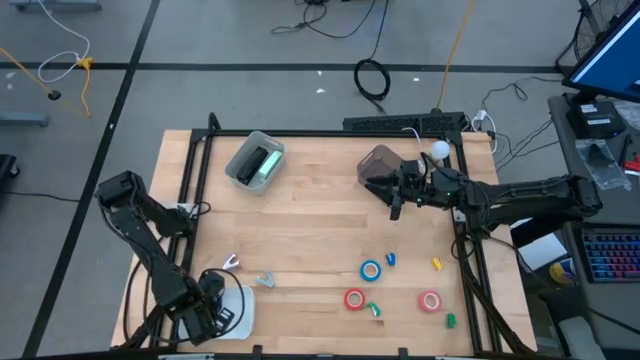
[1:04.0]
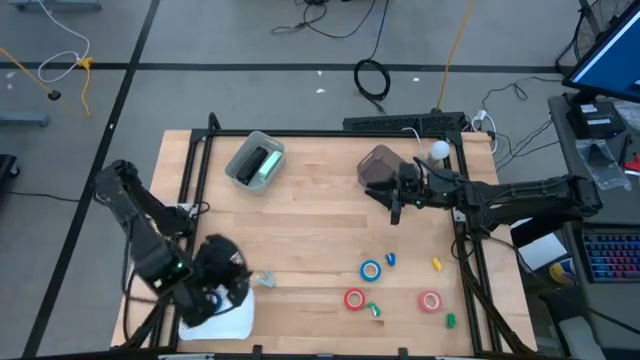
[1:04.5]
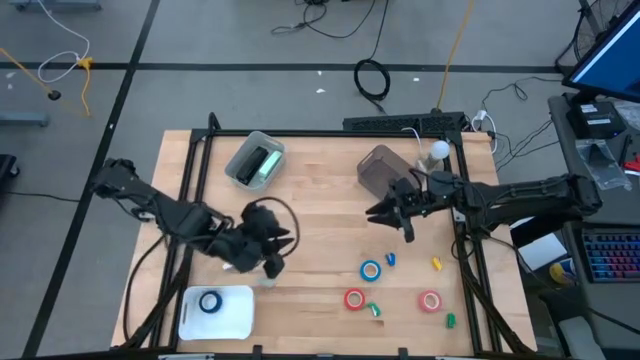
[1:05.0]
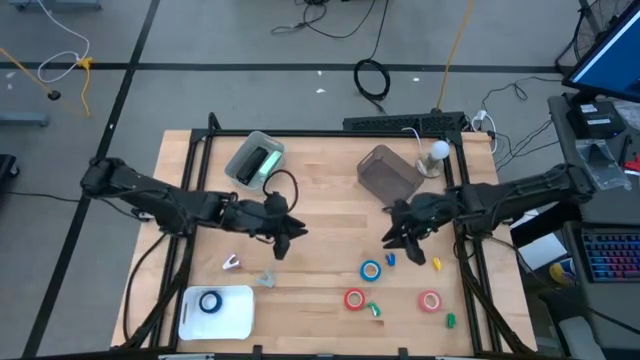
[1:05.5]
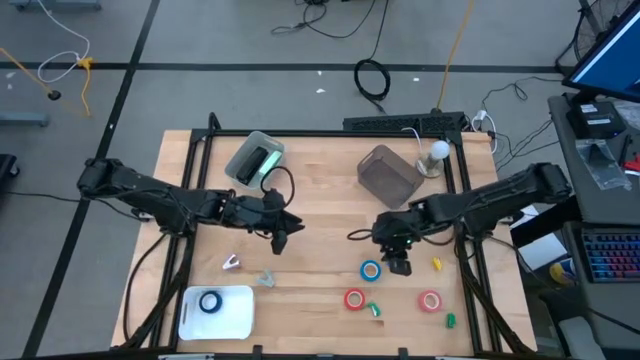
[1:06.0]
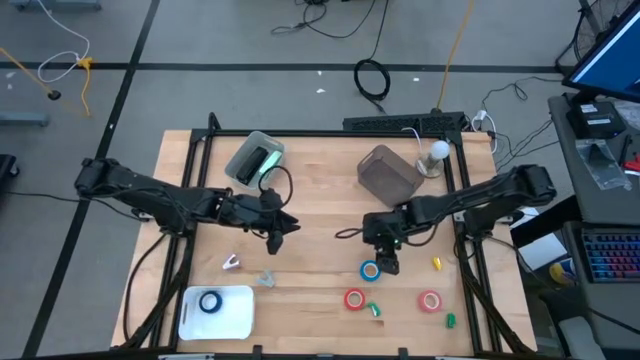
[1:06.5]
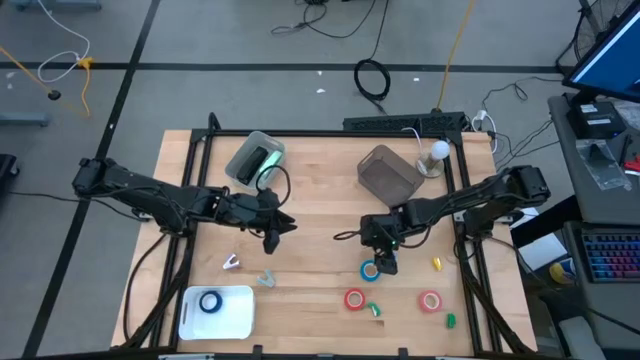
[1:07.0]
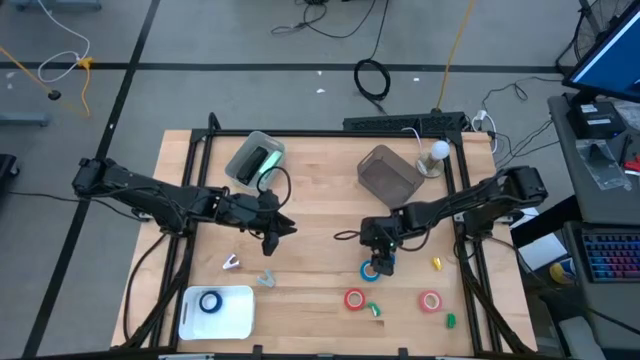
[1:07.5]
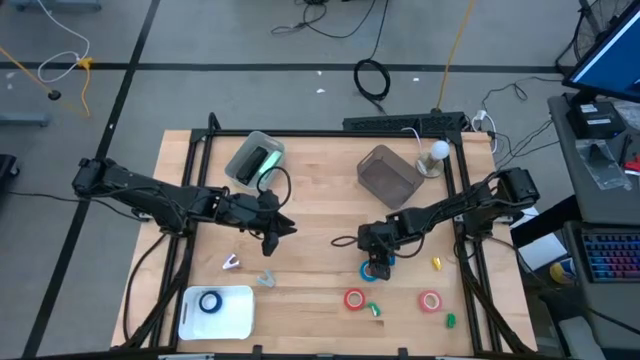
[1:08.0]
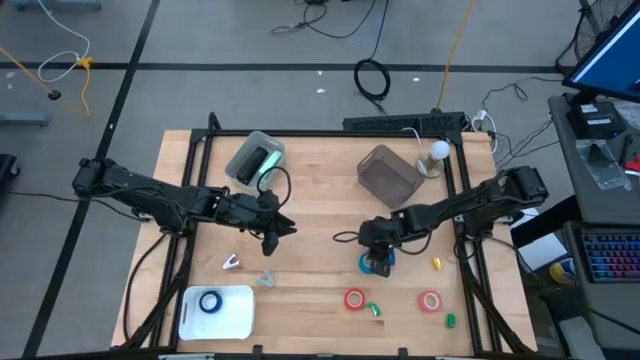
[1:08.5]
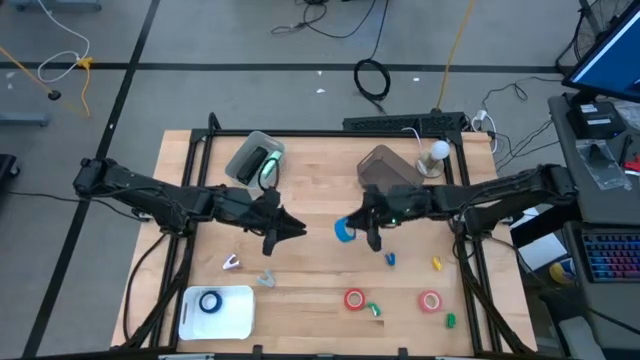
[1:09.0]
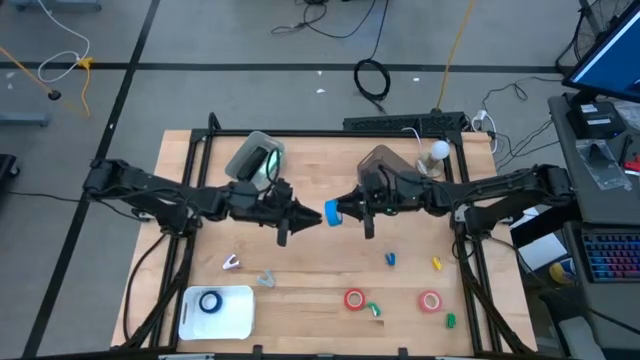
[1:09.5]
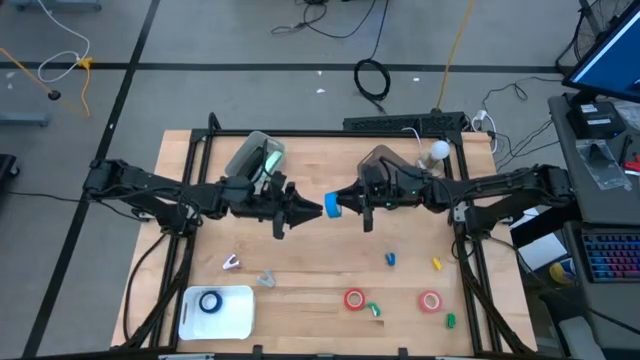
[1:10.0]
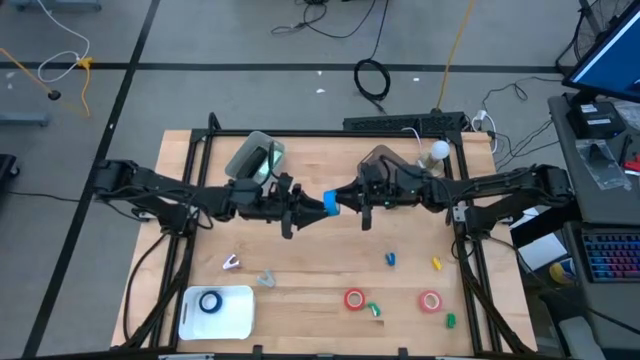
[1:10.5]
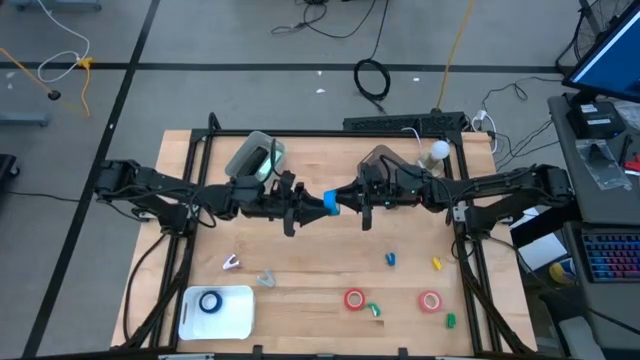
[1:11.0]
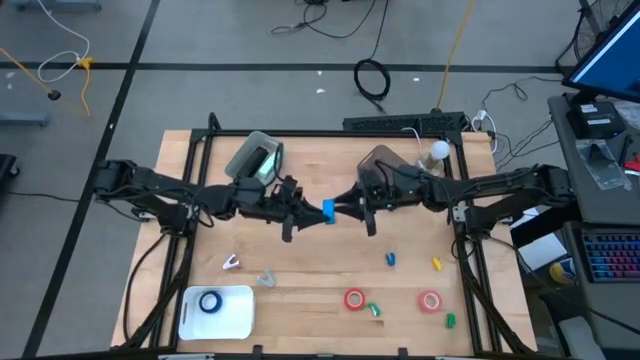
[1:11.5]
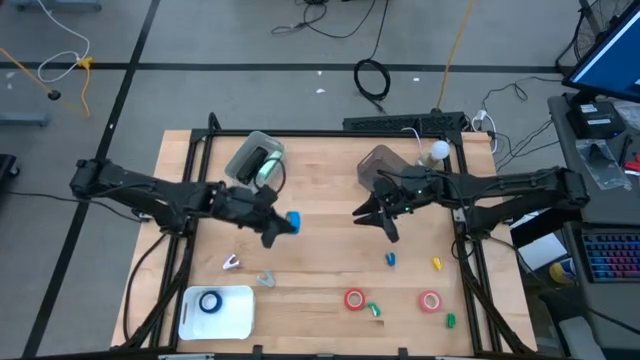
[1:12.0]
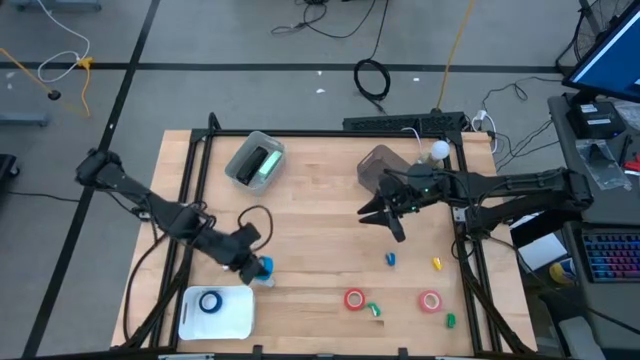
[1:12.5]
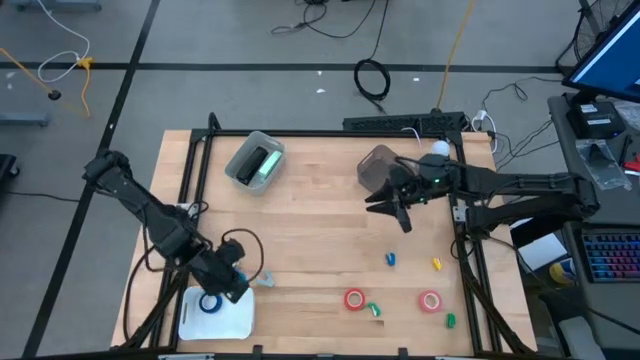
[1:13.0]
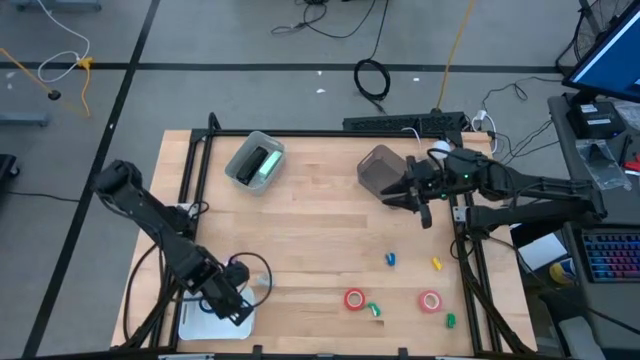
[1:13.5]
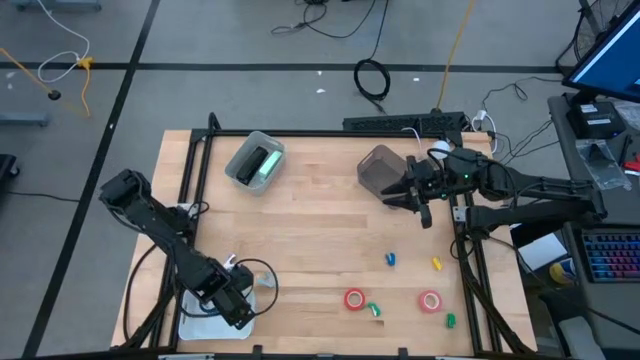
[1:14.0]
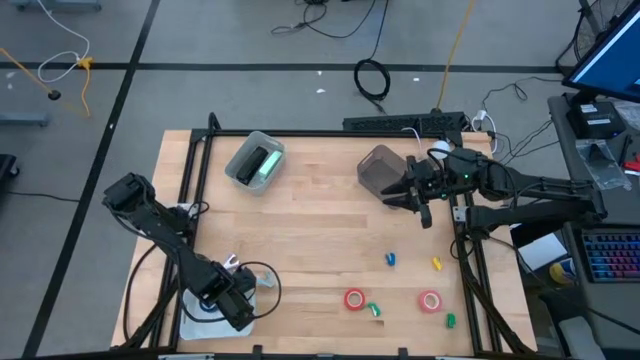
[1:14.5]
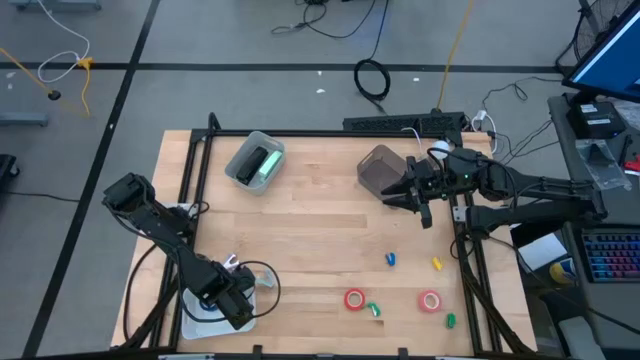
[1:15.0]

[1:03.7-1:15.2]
Task: Pick and place Stapler, Stapler remover, tape
Put the blue tape into the white bin

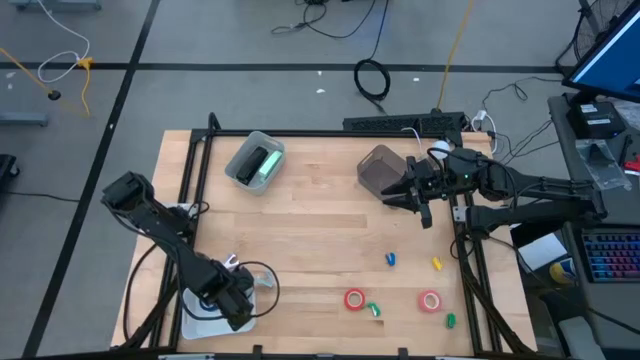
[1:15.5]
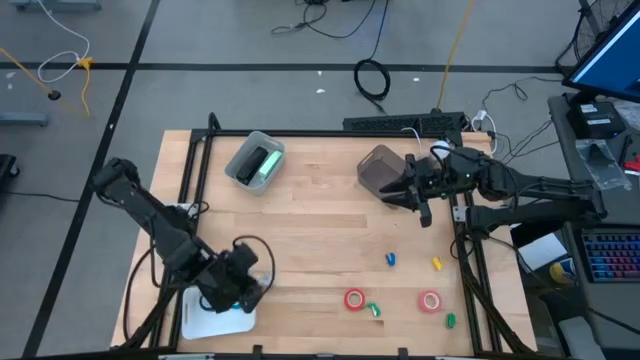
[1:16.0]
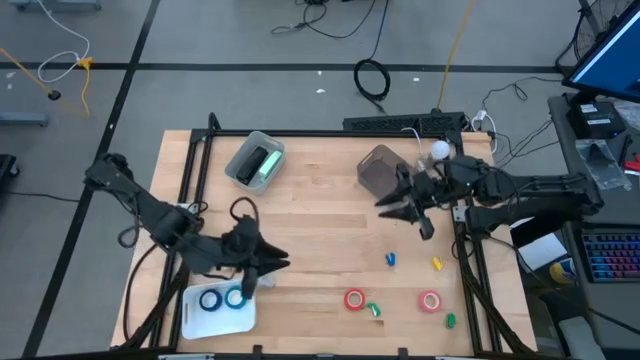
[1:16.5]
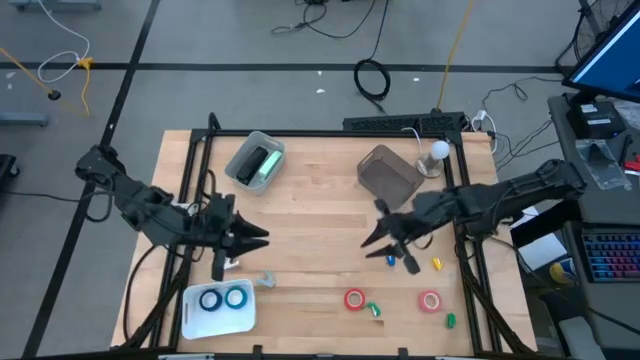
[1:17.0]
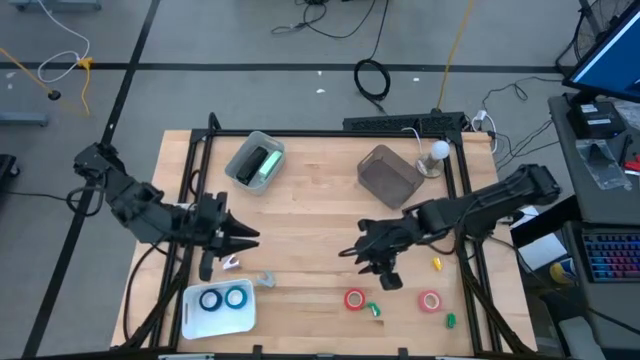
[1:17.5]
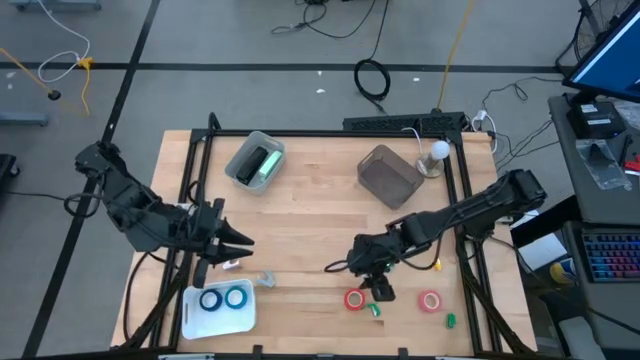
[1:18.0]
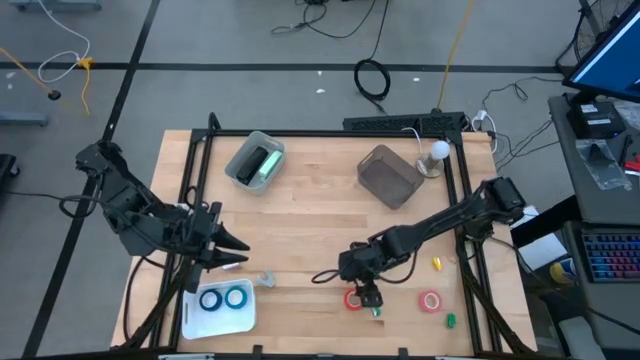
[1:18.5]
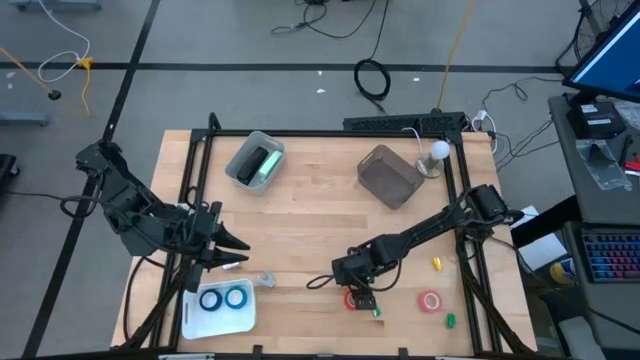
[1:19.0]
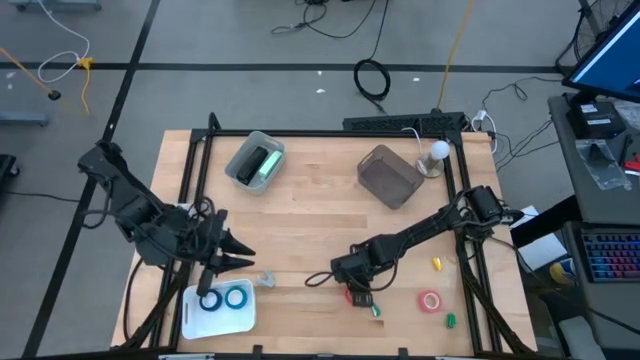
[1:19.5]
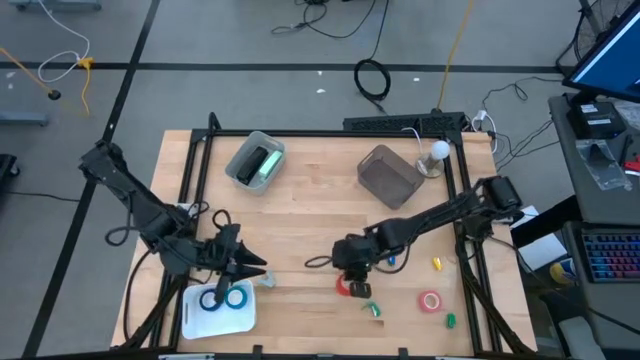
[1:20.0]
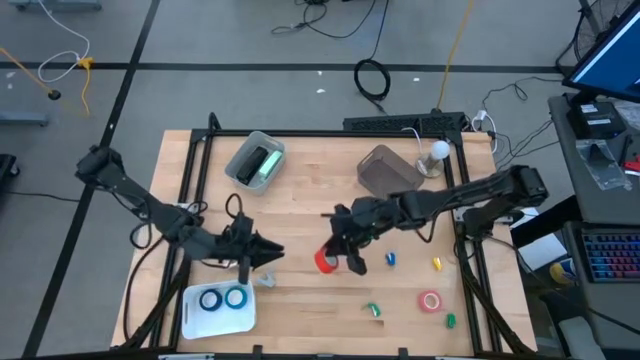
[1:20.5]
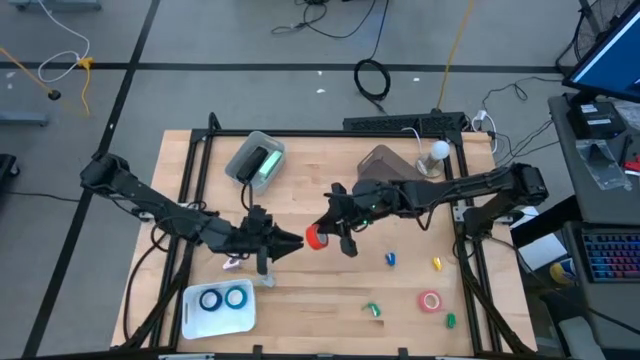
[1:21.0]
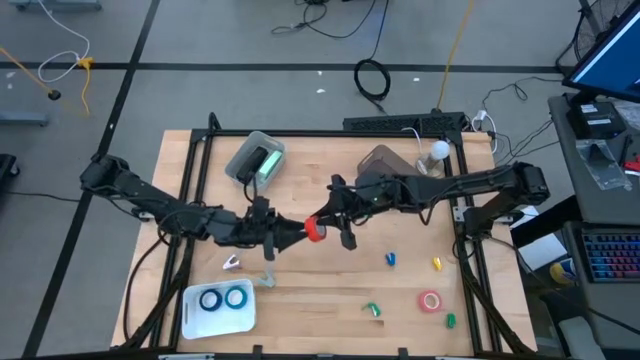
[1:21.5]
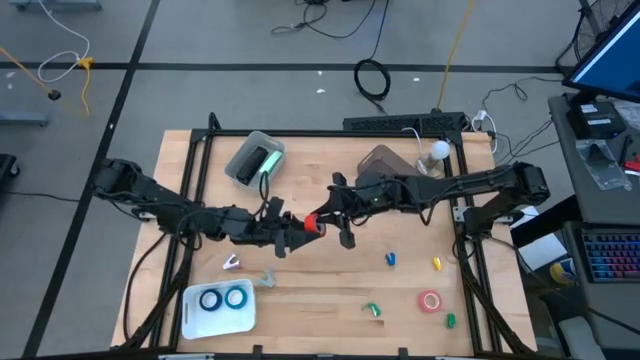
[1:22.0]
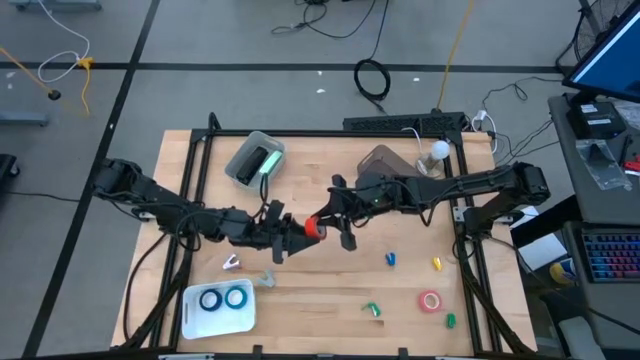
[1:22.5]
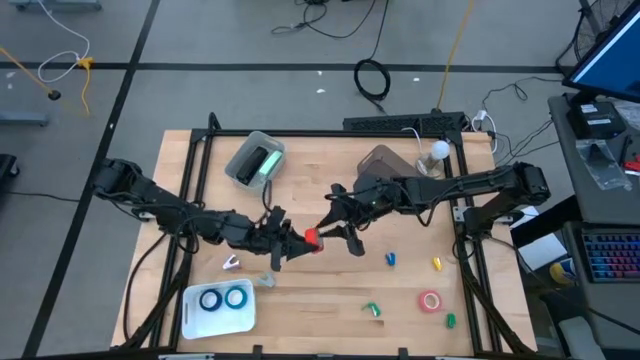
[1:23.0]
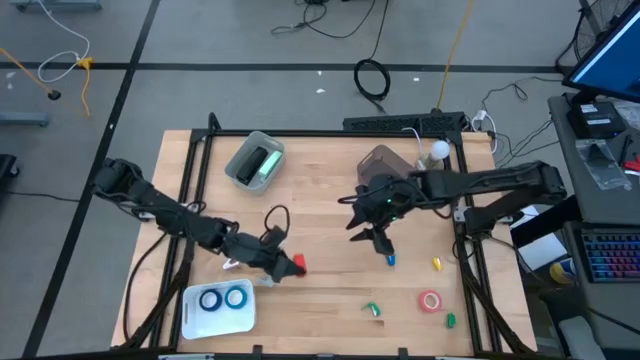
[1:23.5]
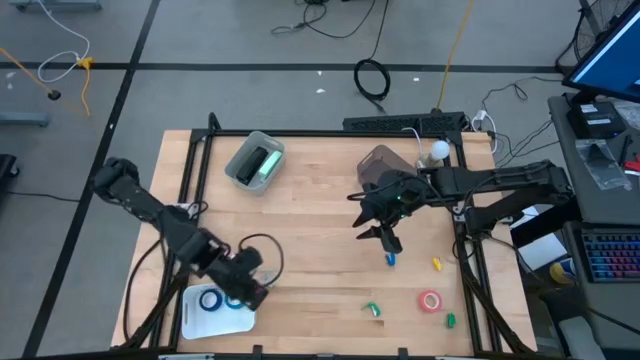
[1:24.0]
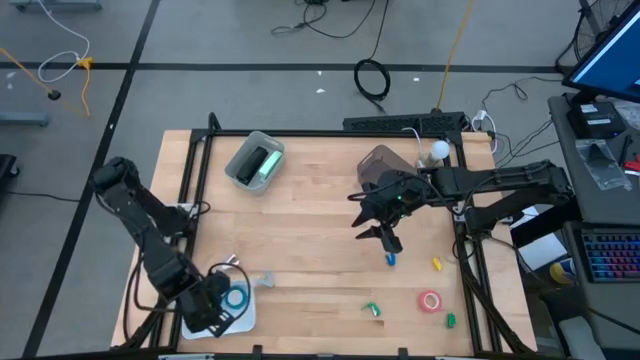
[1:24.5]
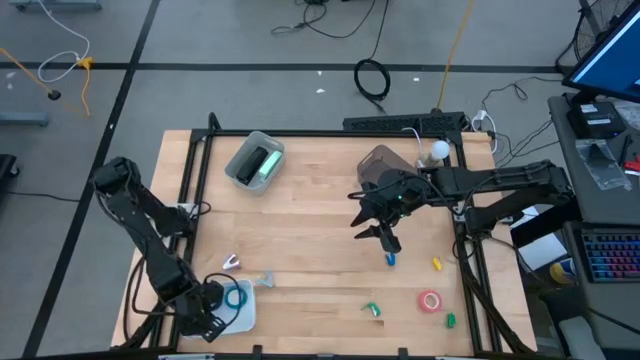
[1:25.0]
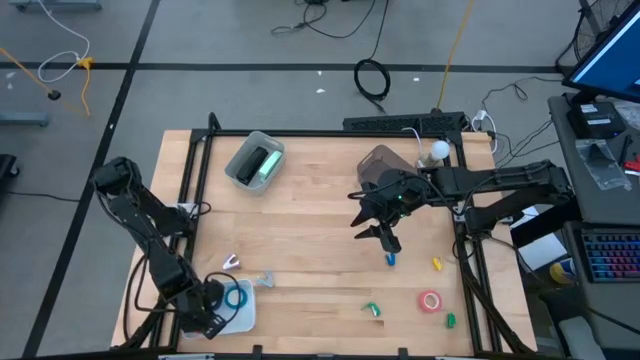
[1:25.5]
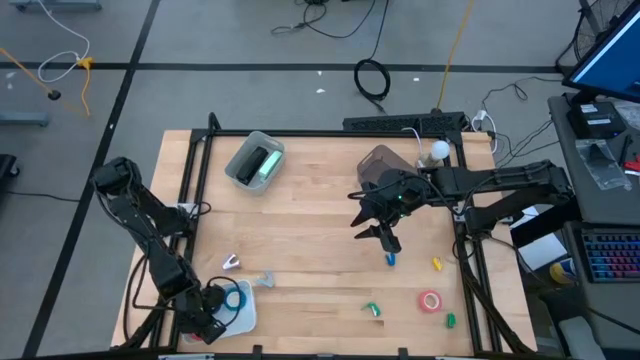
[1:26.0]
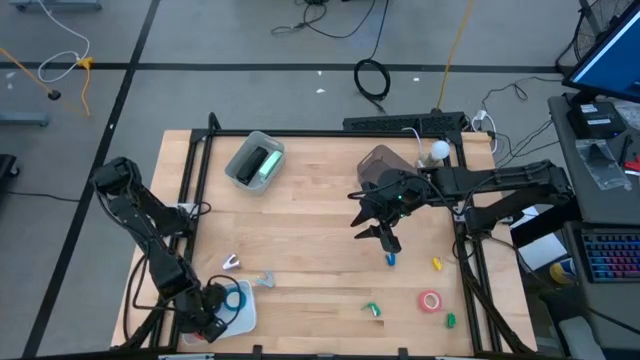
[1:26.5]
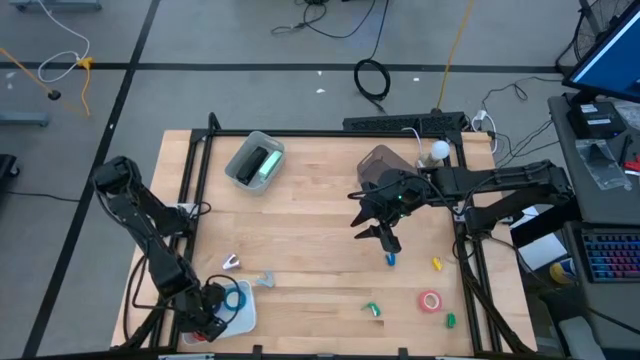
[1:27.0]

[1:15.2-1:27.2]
Put the red tape into the white bin
